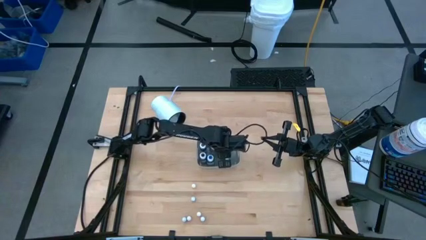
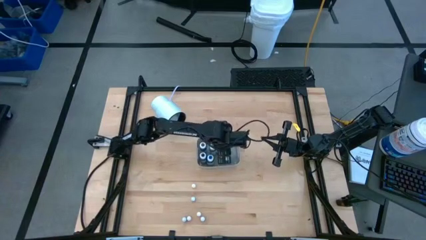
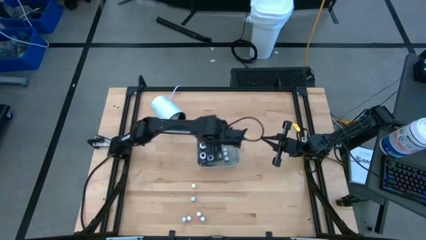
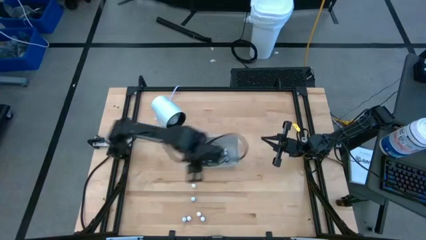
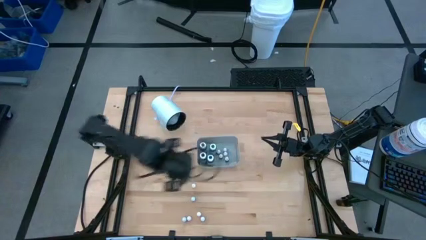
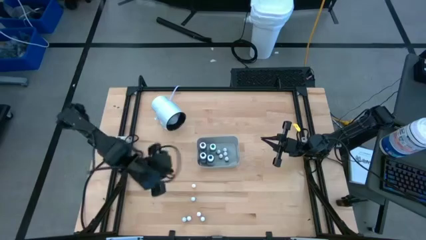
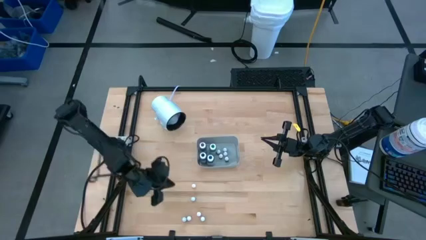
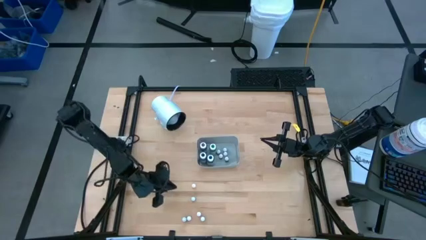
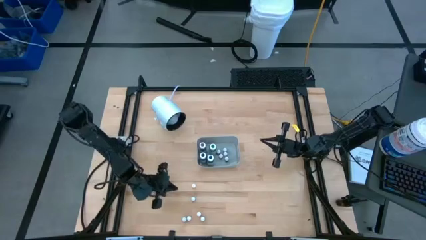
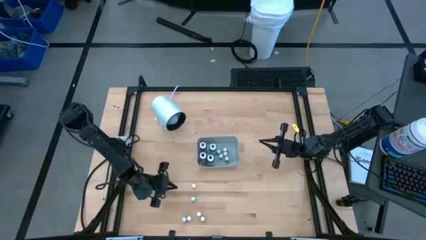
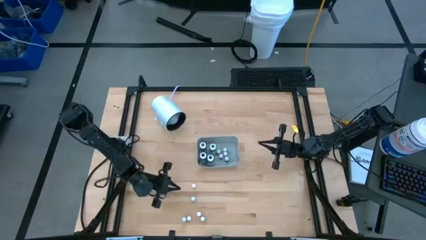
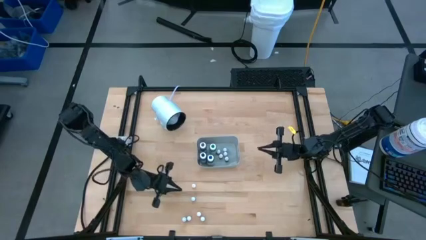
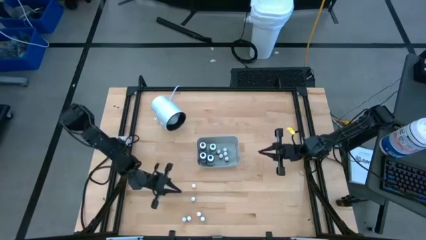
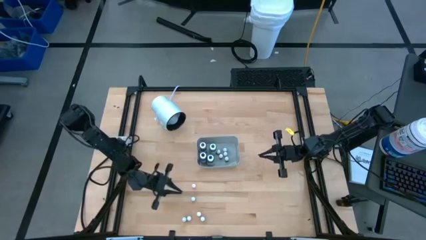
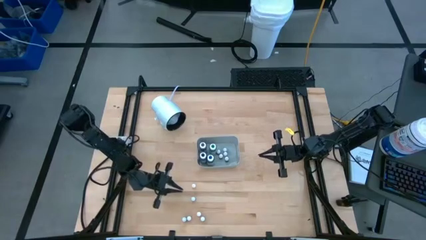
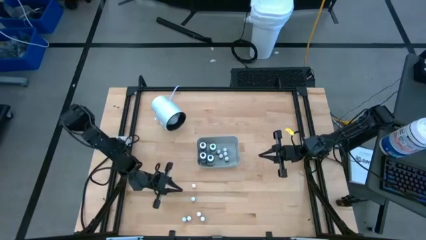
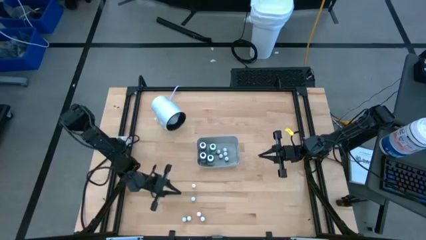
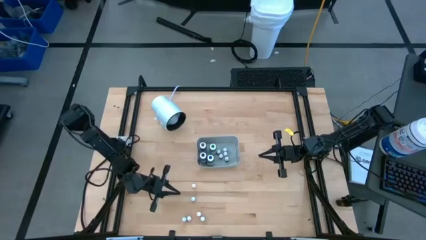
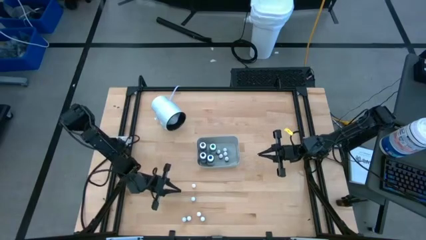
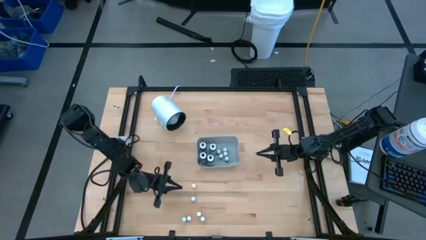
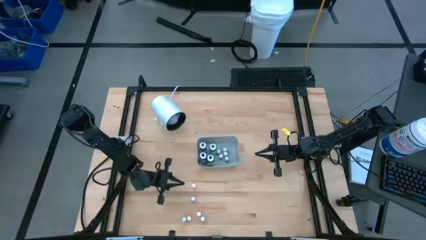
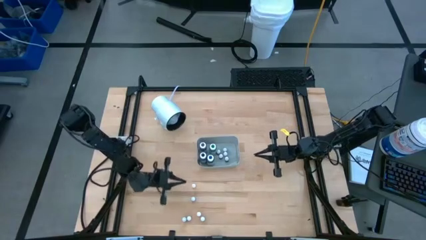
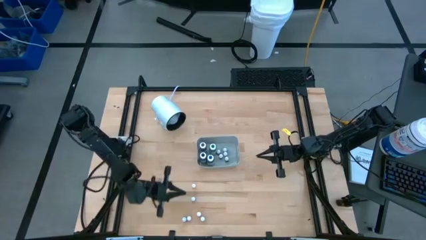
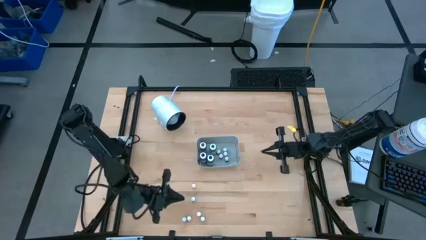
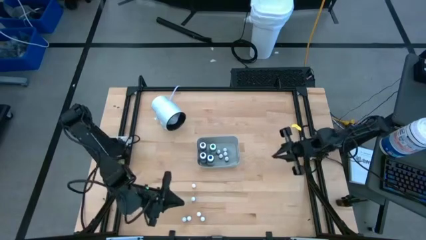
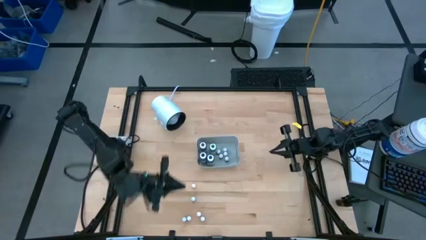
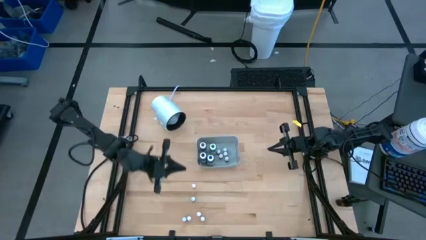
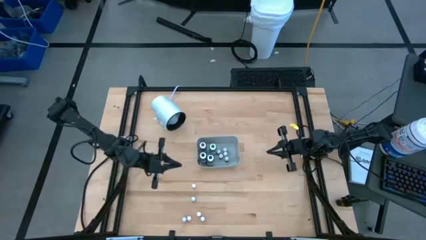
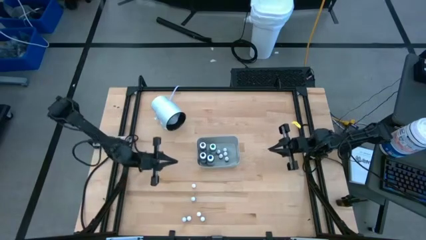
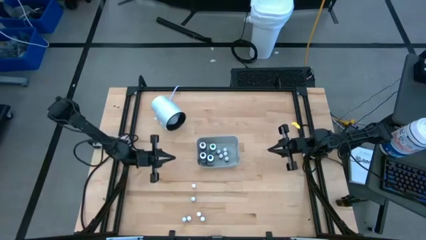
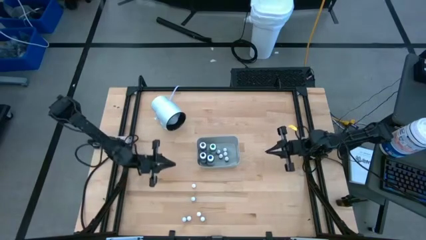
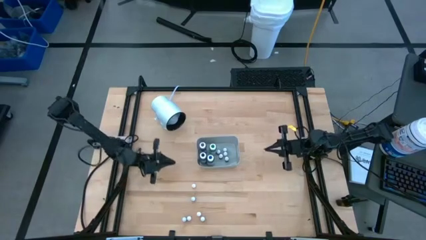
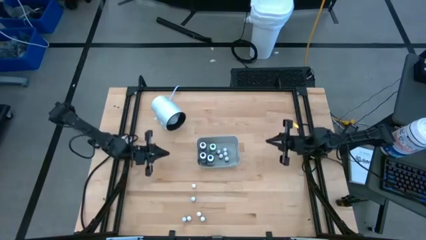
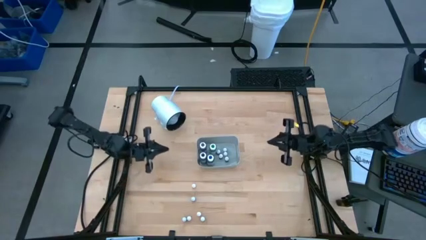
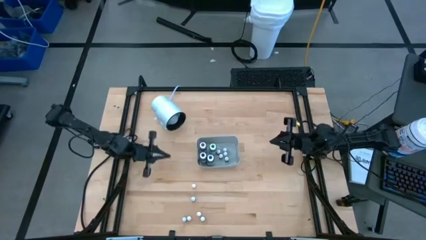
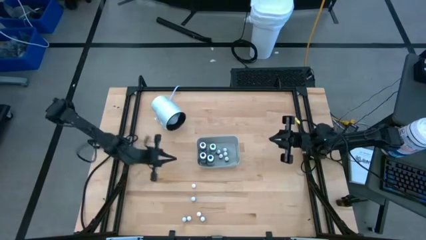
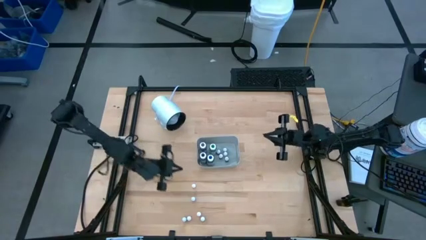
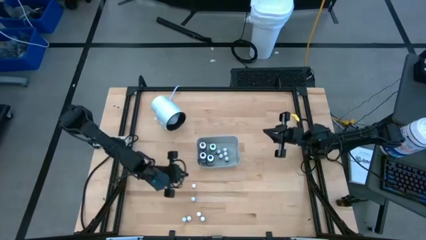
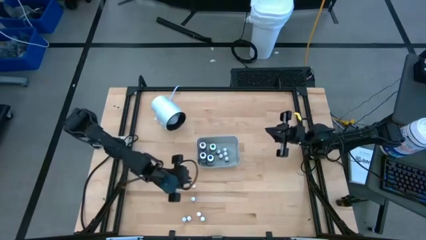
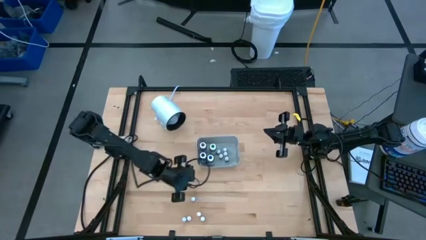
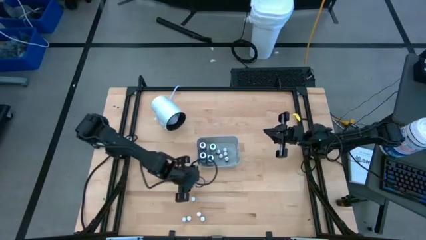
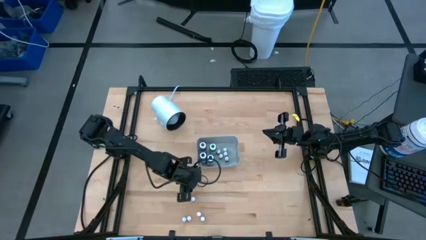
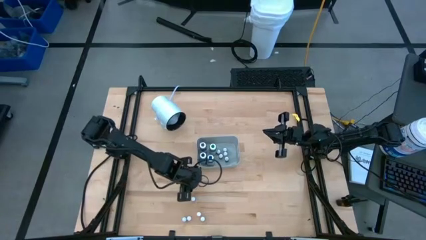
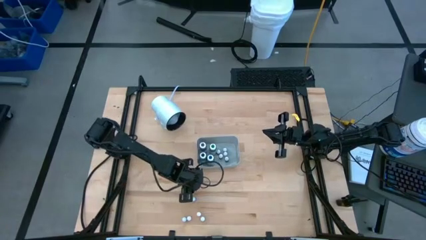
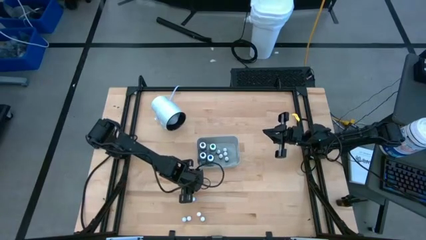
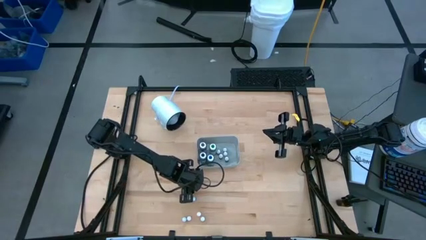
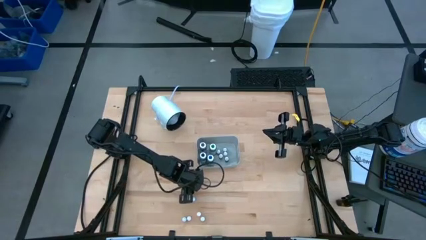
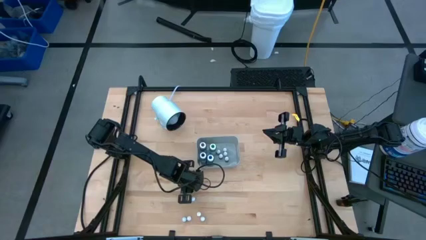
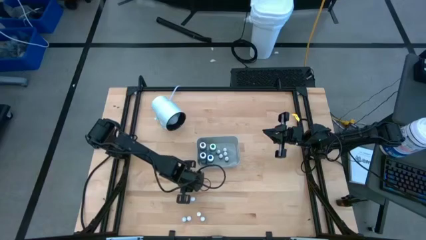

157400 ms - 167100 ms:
Task: Pick & Place food coloring
Put the small orange food coloring bottle into the gray bin
